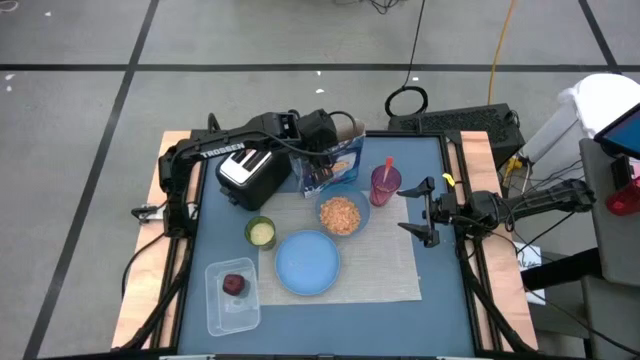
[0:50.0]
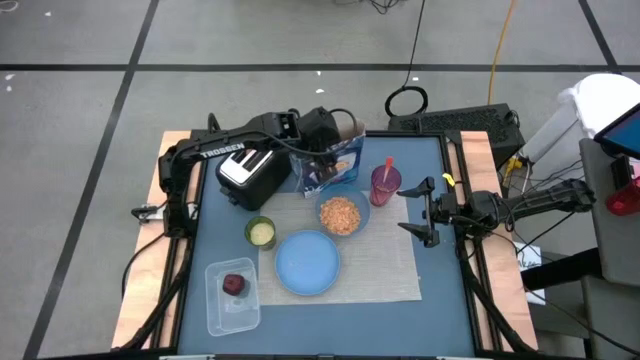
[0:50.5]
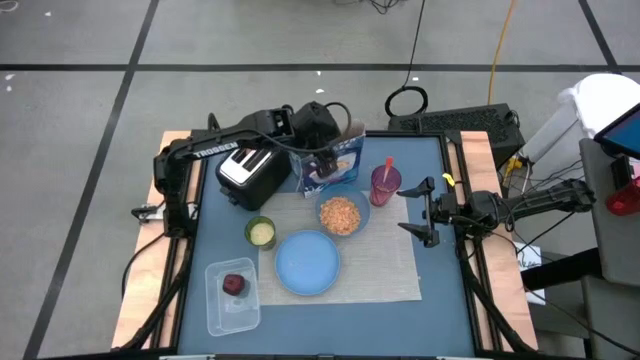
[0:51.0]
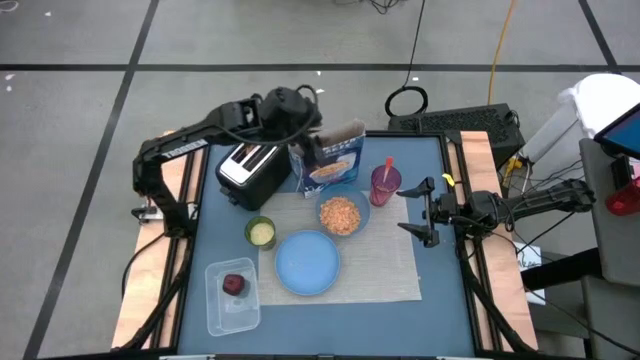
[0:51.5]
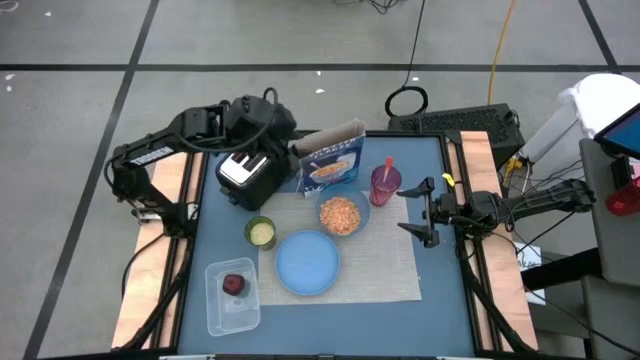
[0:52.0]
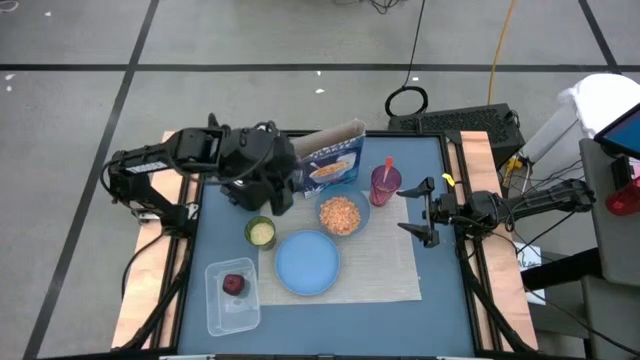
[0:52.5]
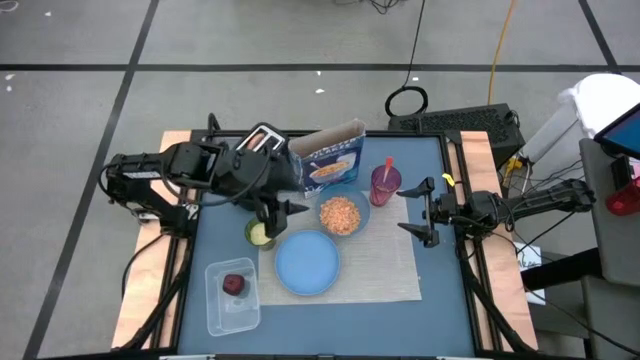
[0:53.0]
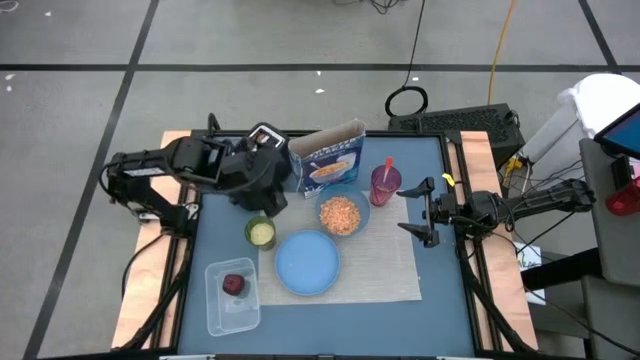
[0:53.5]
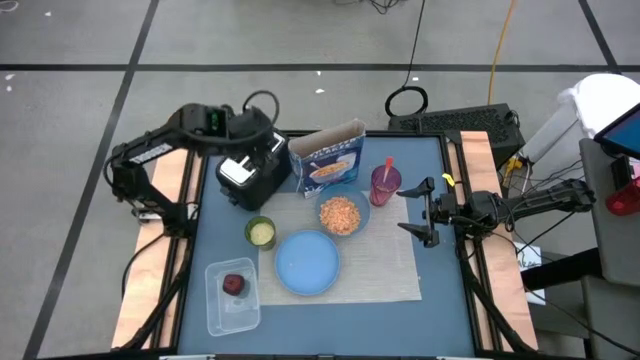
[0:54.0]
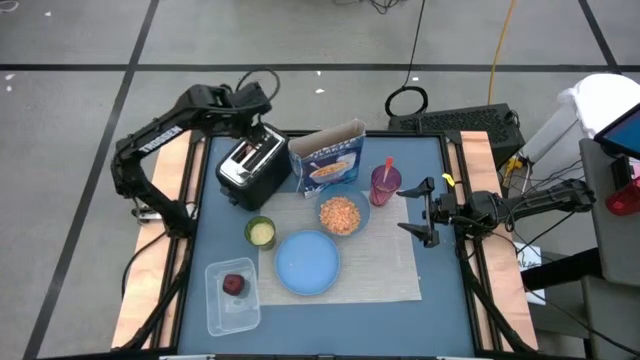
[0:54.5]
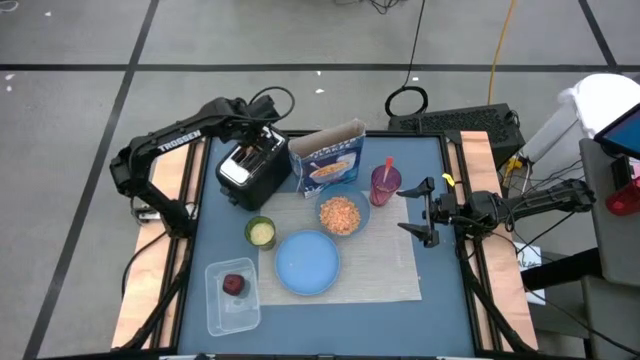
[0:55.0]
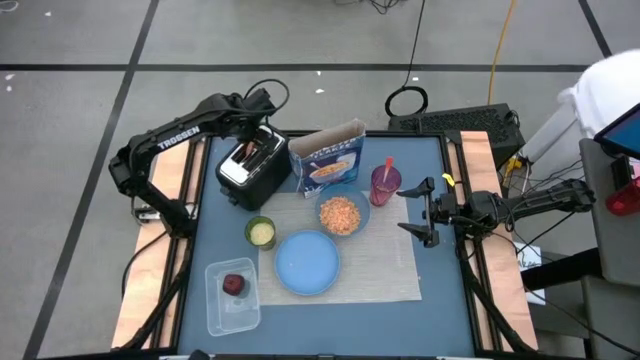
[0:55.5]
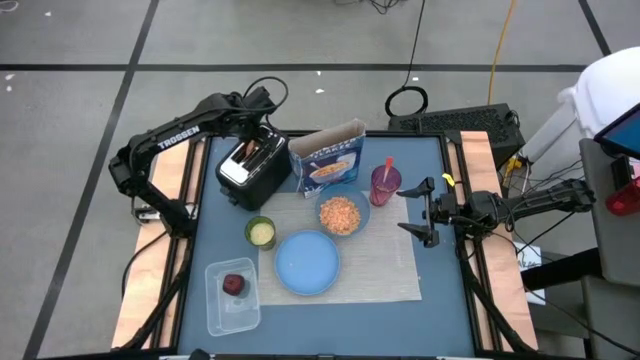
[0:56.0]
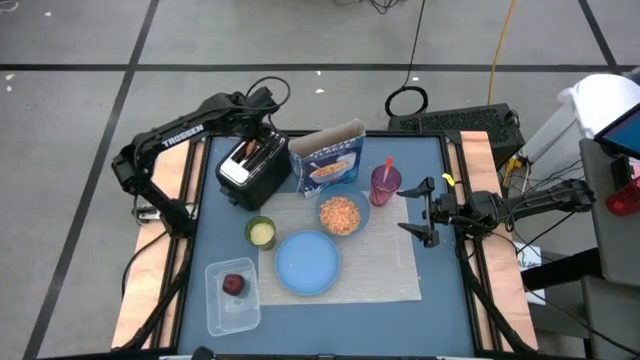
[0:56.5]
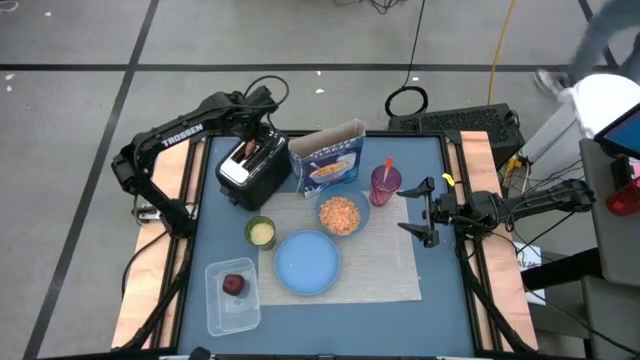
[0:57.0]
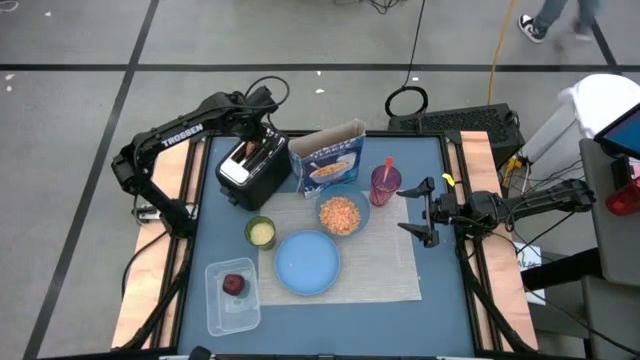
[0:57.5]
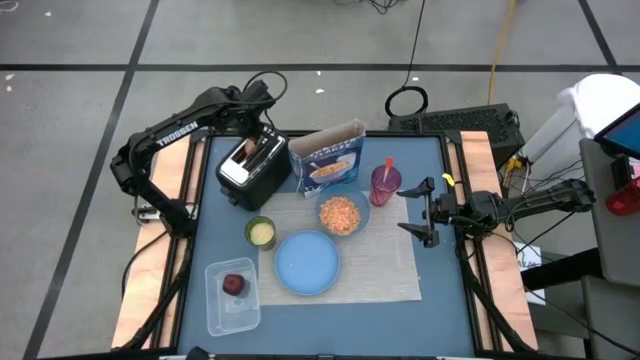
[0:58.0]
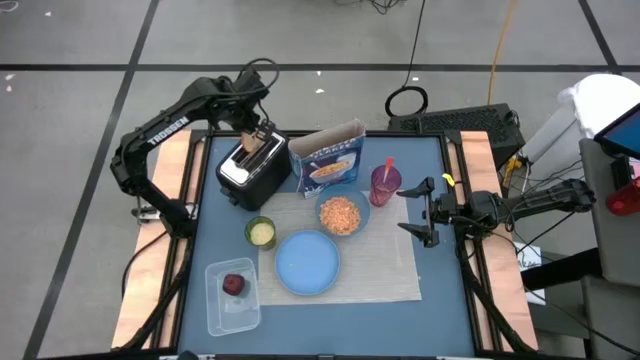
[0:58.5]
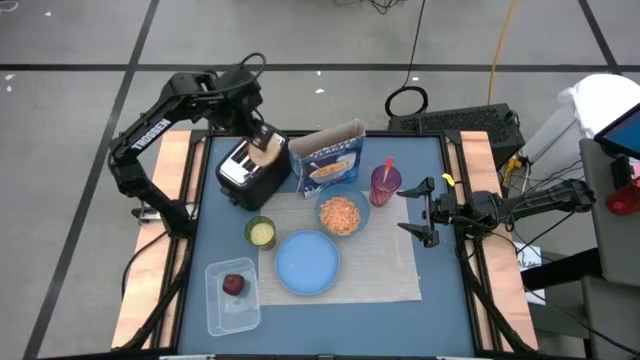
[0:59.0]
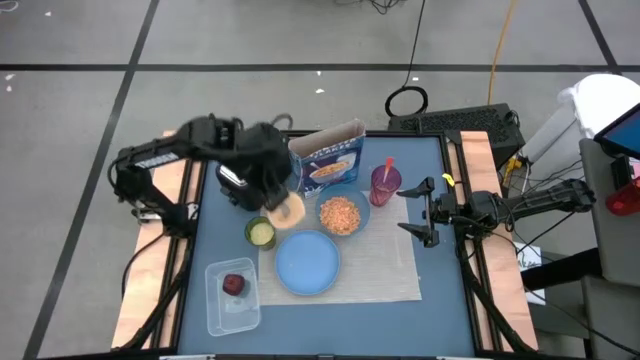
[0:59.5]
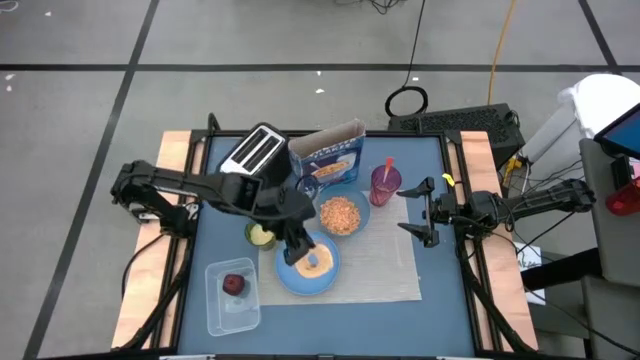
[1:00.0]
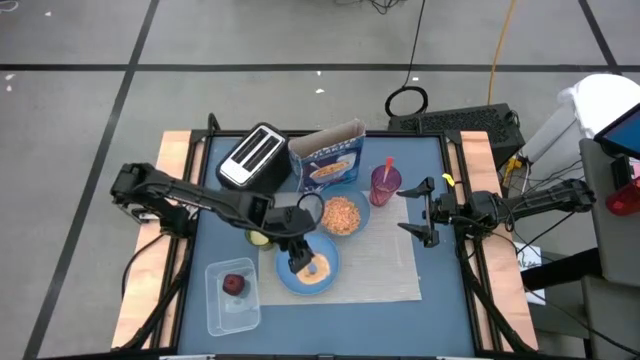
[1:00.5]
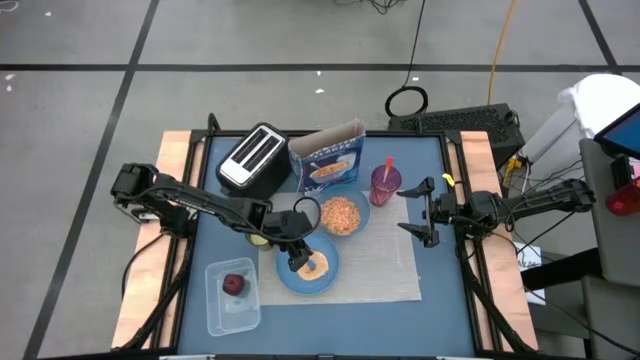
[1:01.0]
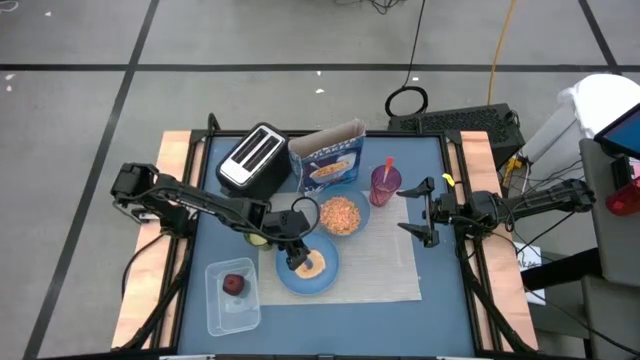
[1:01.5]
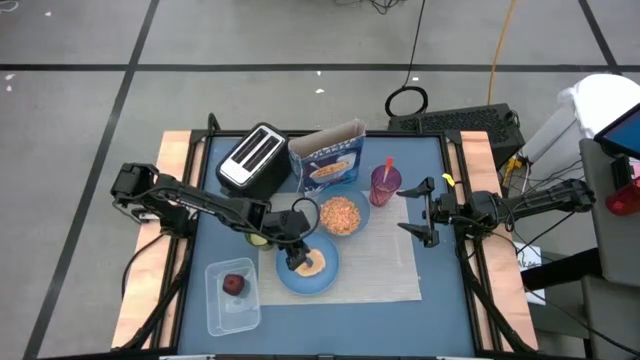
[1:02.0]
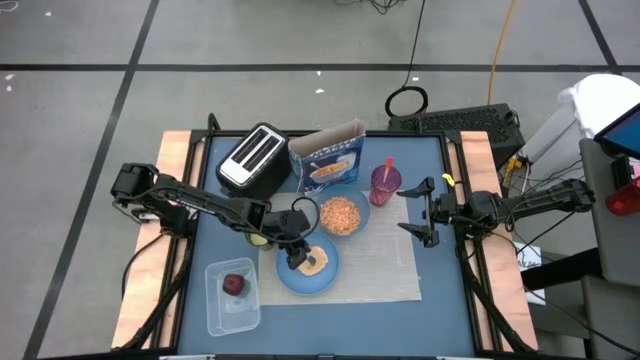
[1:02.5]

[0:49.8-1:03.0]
Task: Arrange a breakfast setting
Put the toasted bagel on the blue plate

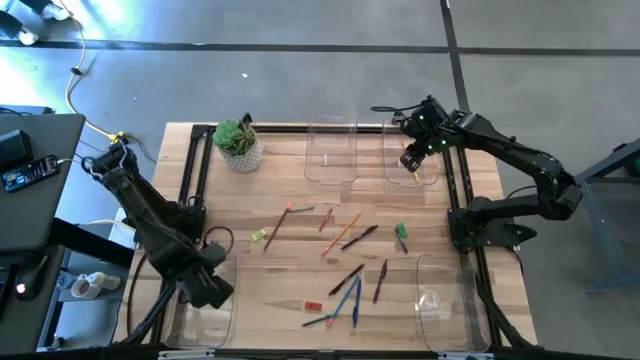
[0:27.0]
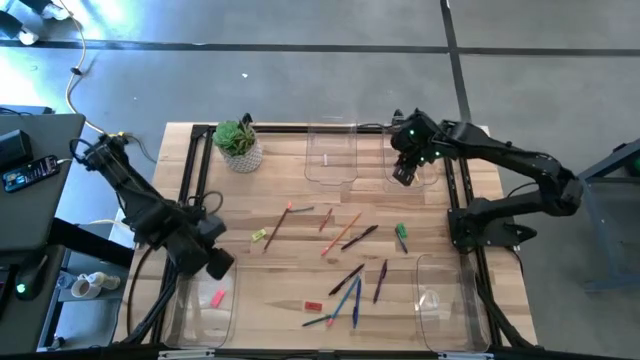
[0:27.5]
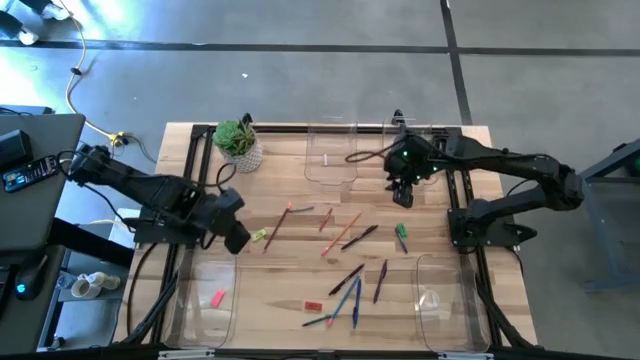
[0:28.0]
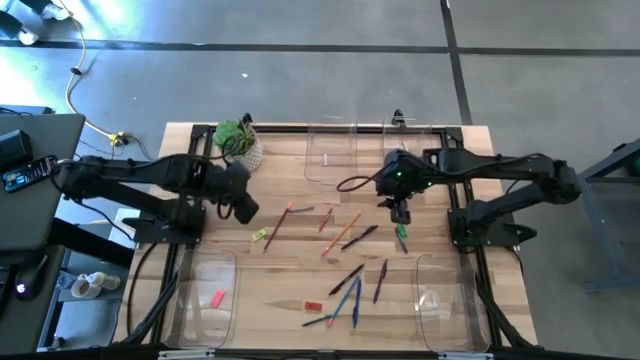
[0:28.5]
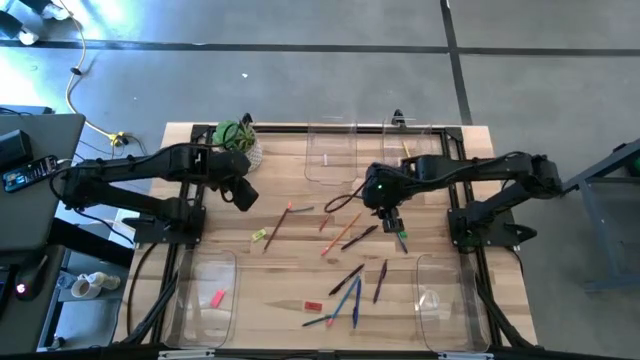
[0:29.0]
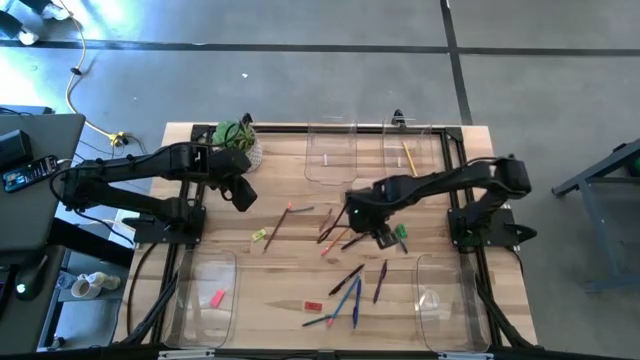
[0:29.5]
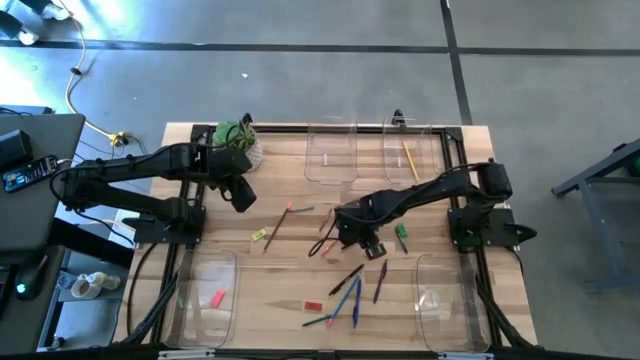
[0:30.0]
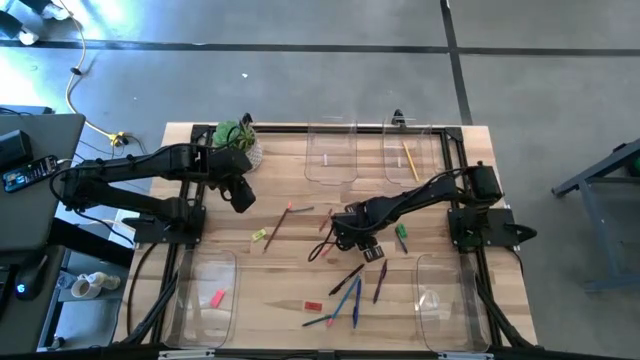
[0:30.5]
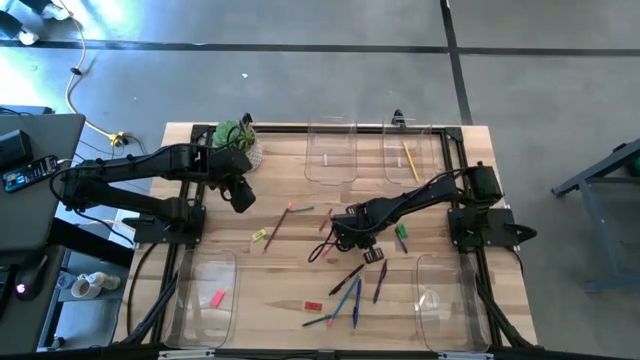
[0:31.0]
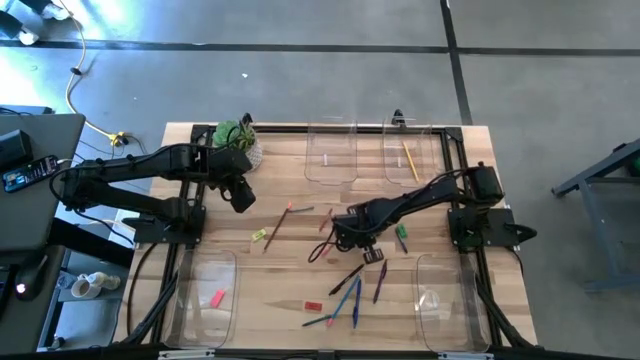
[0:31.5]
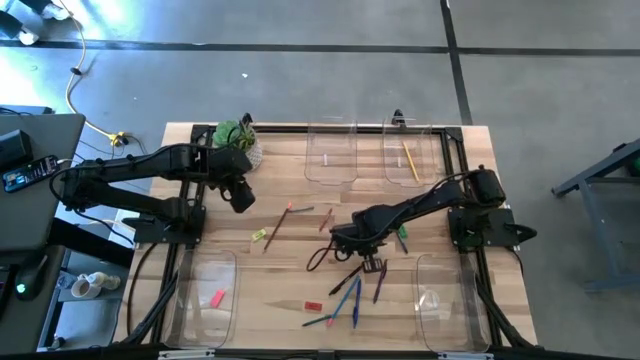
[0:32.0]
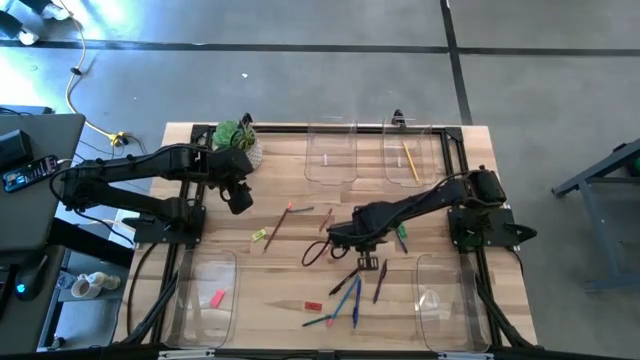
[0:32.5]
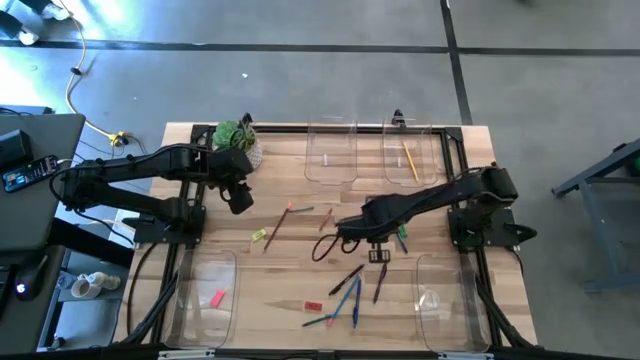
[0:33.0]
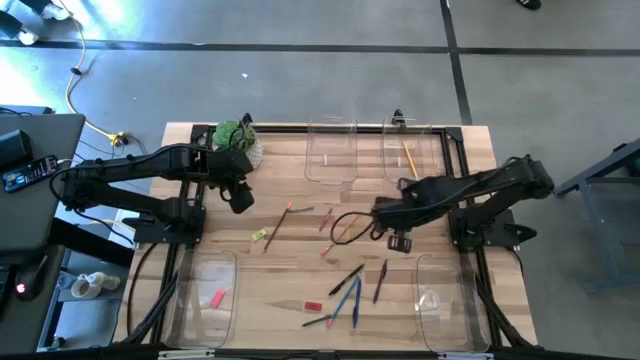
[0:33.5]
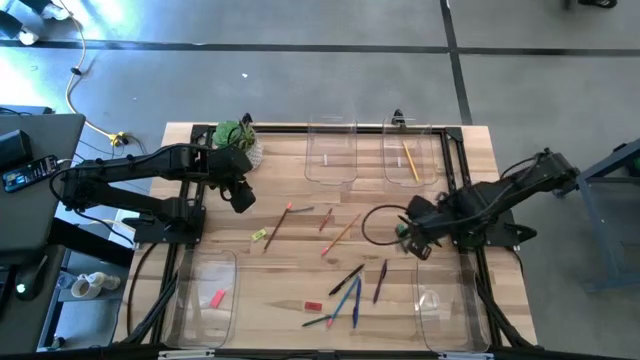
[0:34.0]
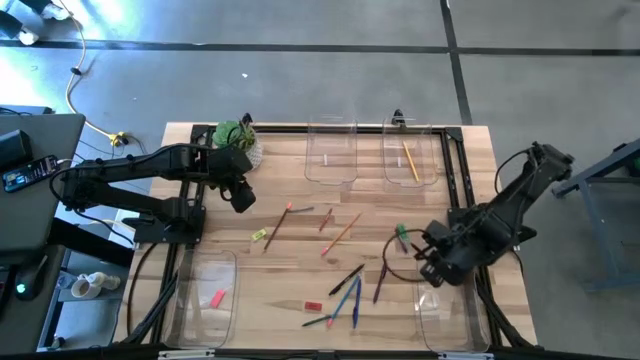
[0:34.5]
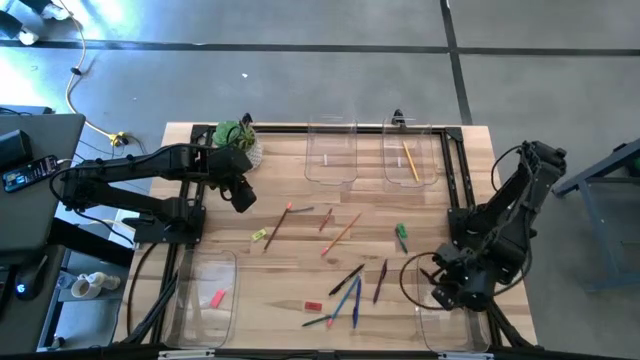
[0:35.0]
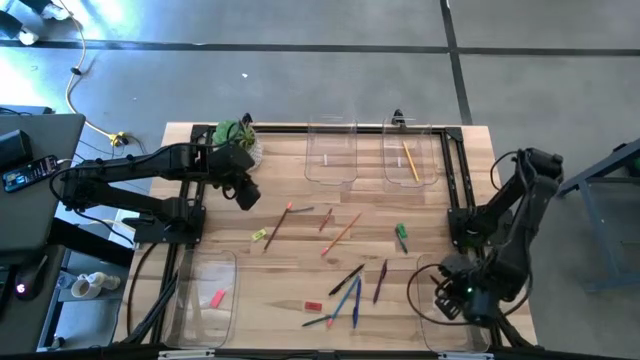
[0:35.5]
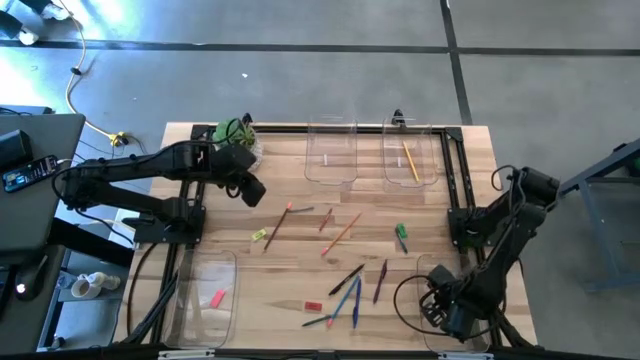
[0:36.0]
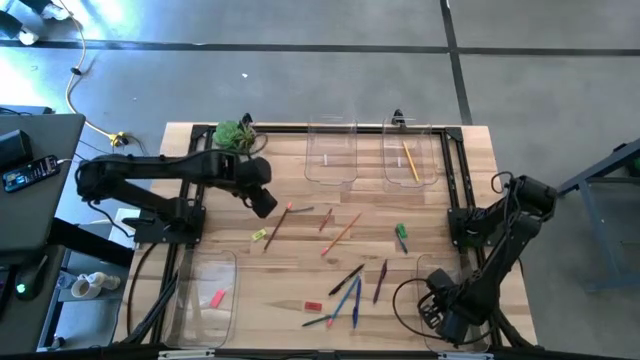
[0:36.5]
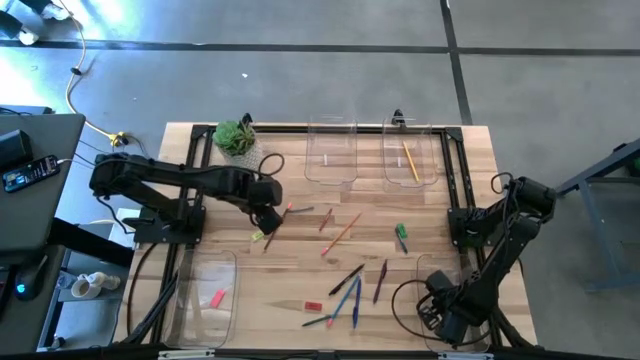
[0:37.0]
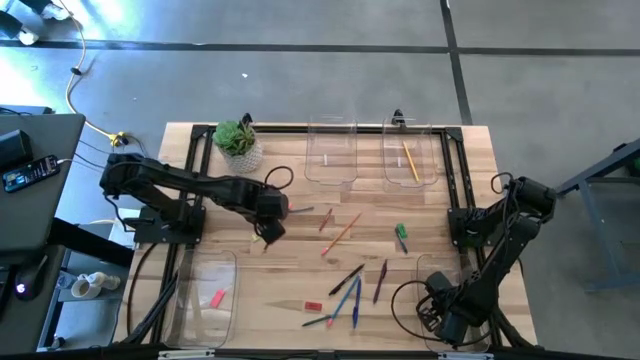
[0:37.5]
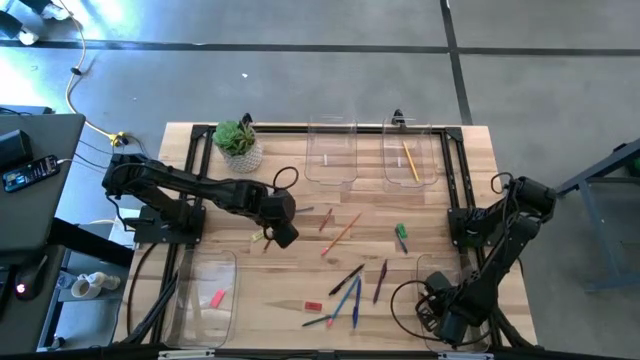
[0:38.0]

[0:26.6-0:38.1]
Task: Sort crayons/erasers/pens/pencils in bins
Put the top black pen into the bottom right transparent bin
